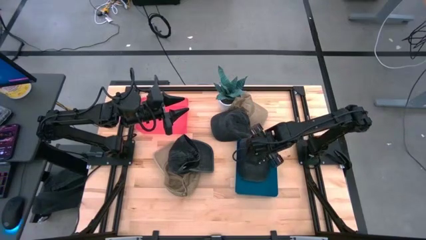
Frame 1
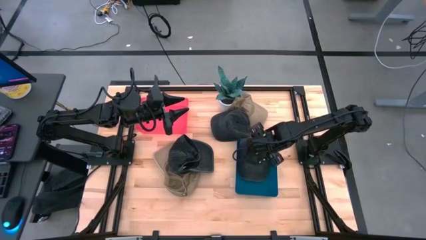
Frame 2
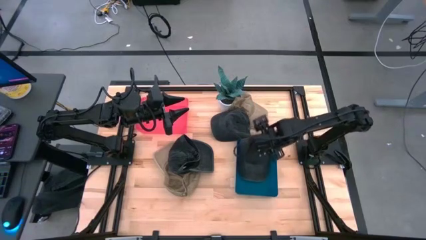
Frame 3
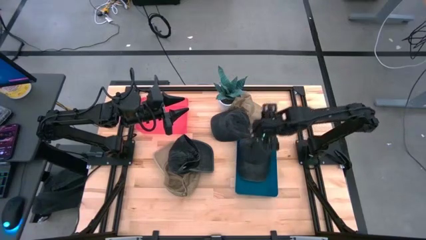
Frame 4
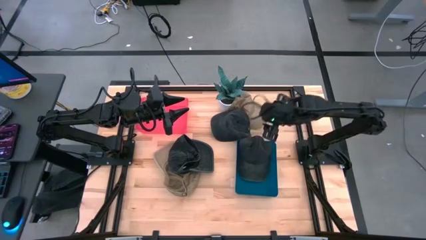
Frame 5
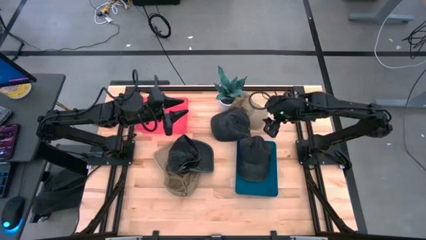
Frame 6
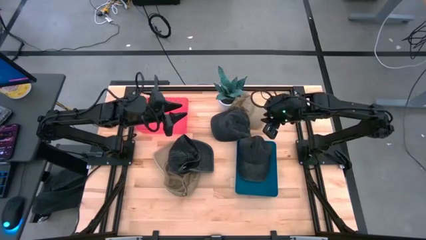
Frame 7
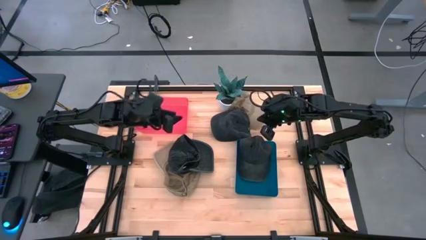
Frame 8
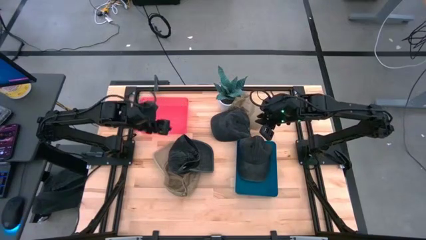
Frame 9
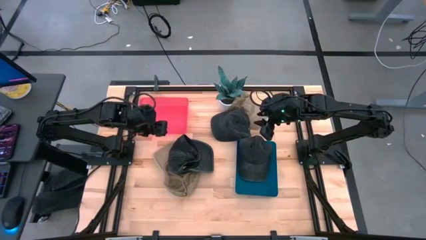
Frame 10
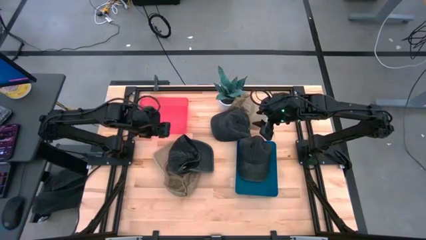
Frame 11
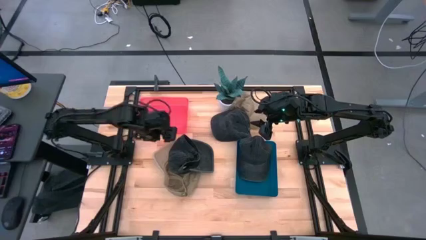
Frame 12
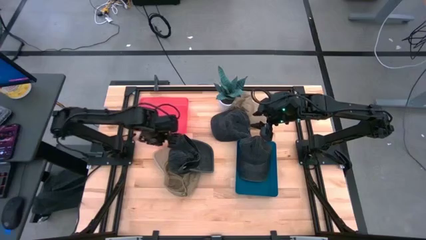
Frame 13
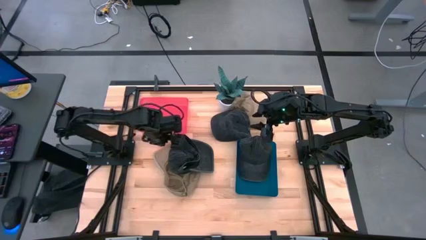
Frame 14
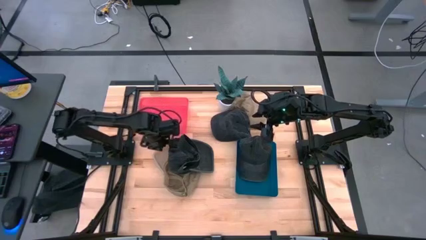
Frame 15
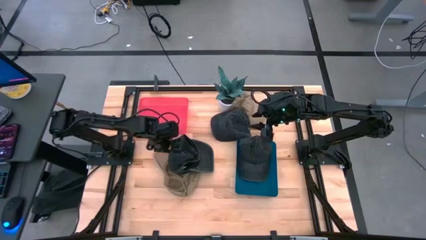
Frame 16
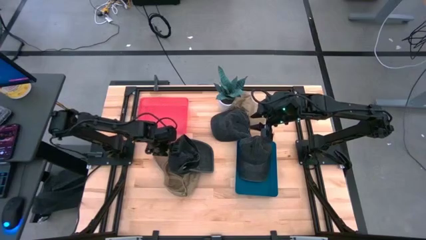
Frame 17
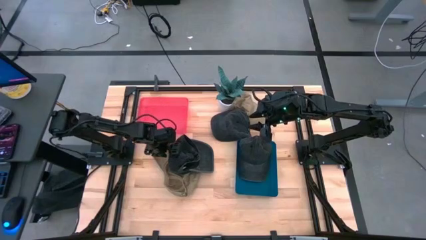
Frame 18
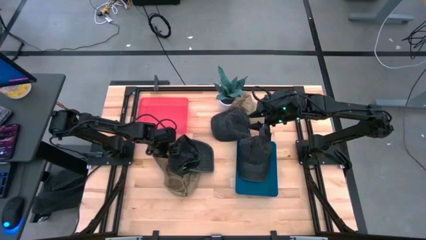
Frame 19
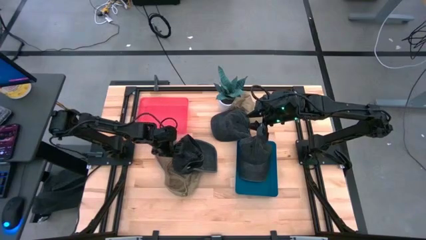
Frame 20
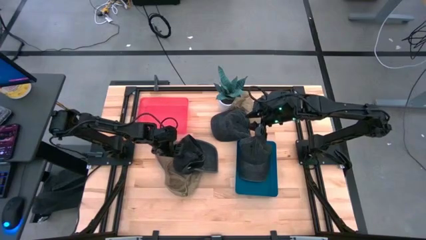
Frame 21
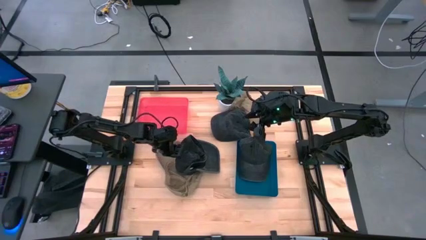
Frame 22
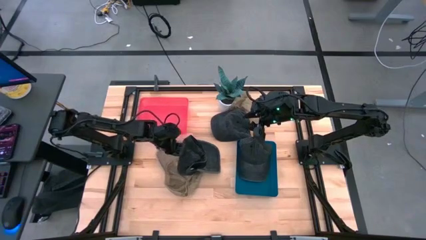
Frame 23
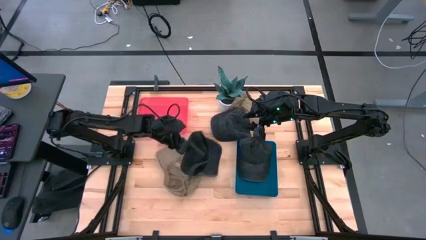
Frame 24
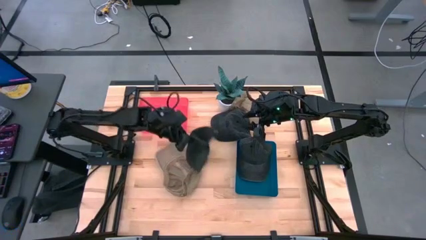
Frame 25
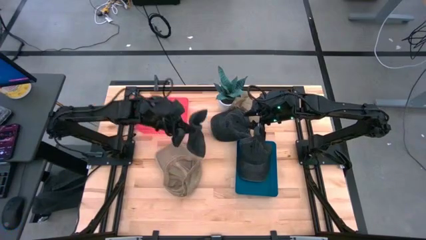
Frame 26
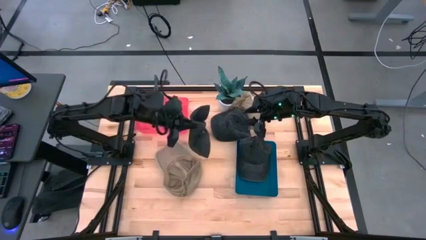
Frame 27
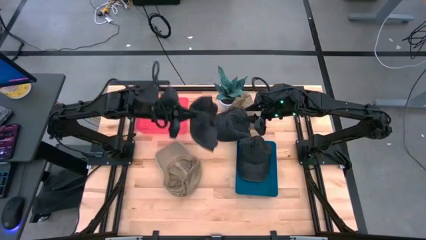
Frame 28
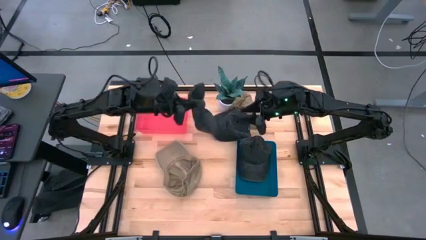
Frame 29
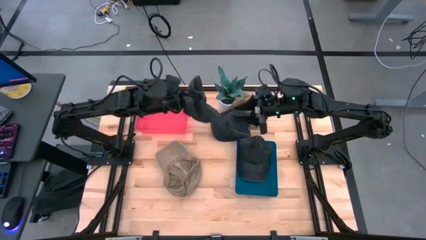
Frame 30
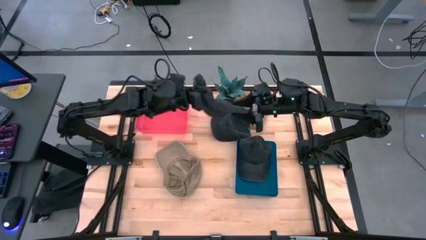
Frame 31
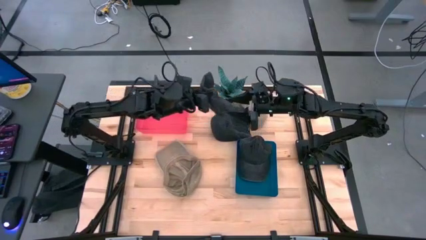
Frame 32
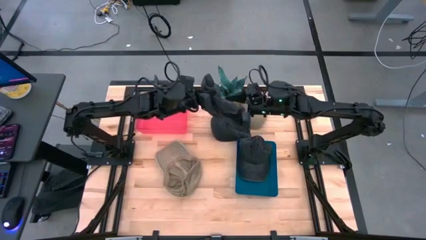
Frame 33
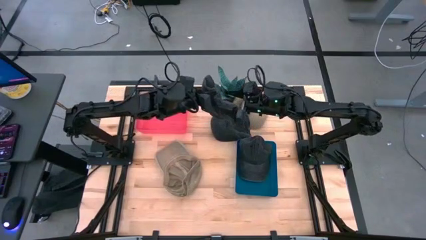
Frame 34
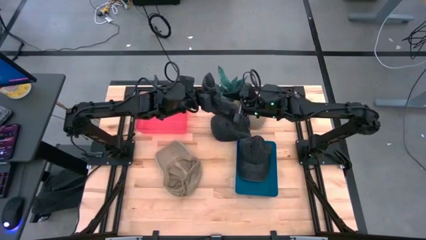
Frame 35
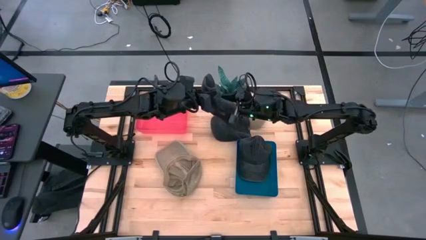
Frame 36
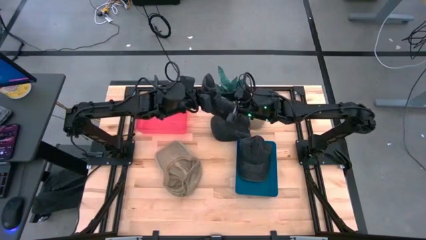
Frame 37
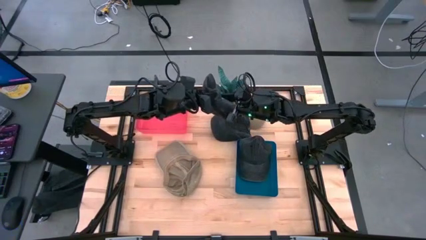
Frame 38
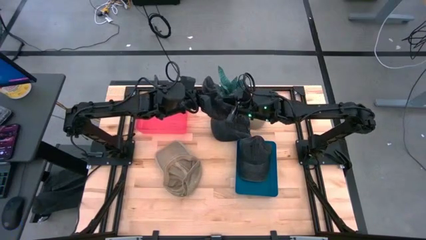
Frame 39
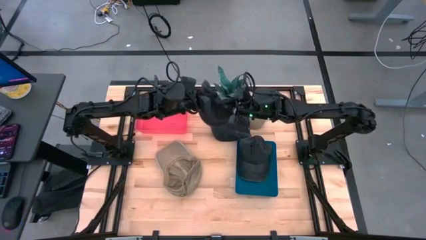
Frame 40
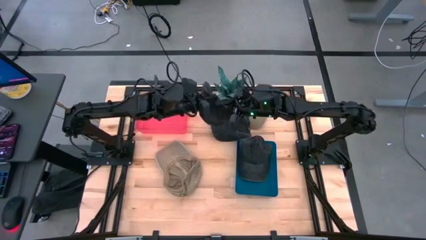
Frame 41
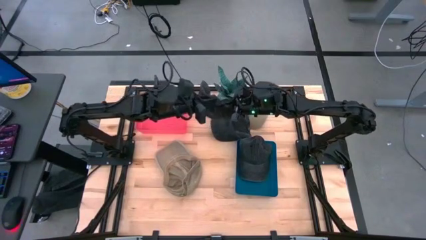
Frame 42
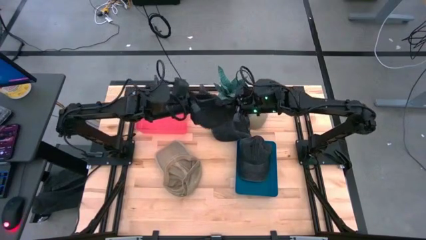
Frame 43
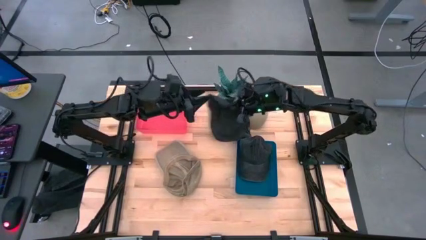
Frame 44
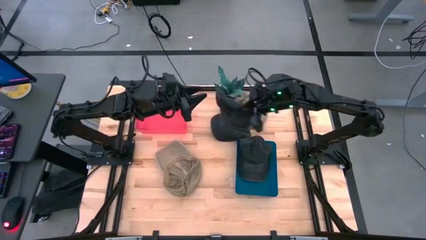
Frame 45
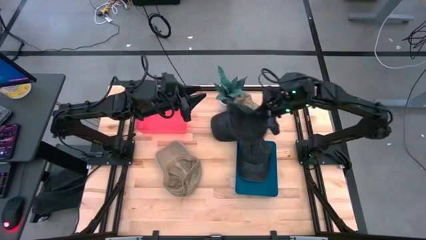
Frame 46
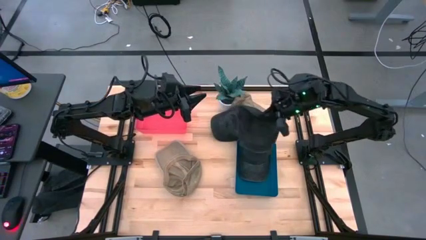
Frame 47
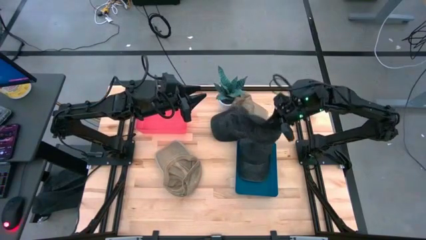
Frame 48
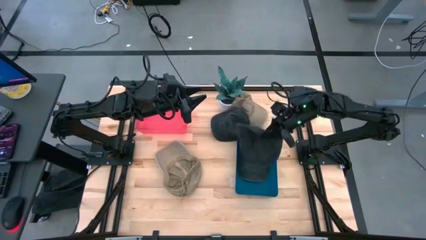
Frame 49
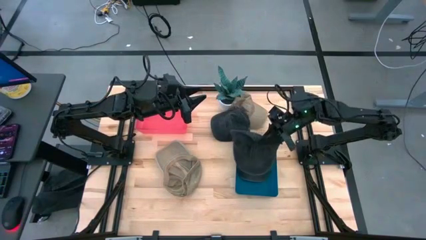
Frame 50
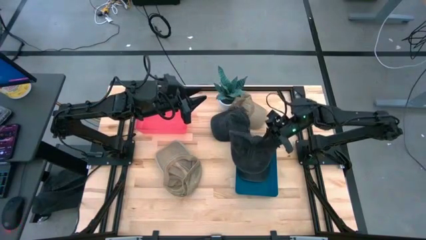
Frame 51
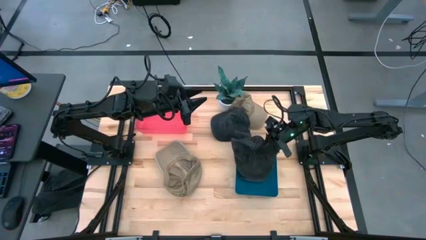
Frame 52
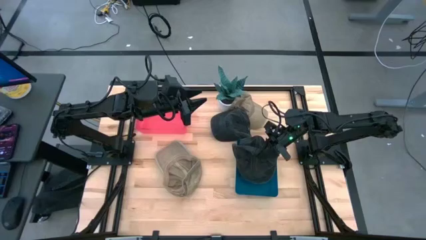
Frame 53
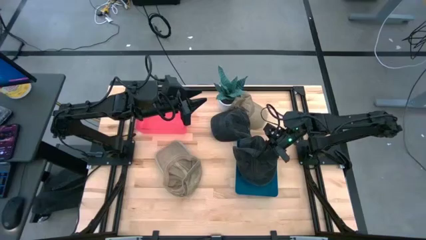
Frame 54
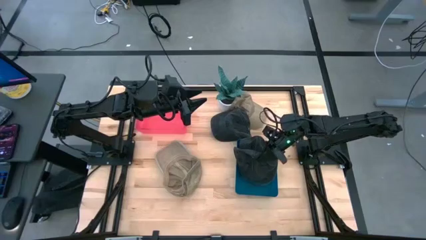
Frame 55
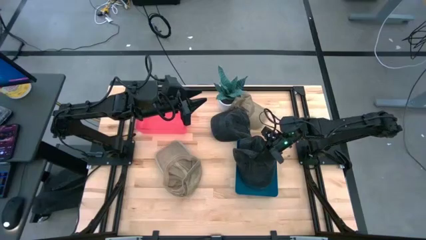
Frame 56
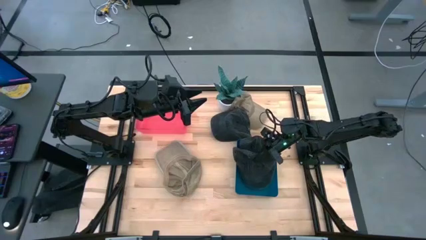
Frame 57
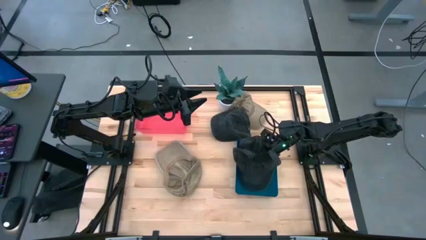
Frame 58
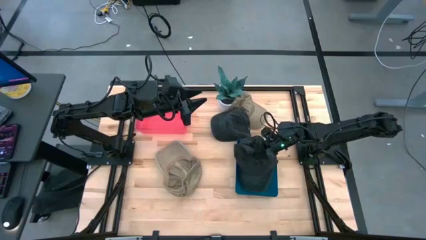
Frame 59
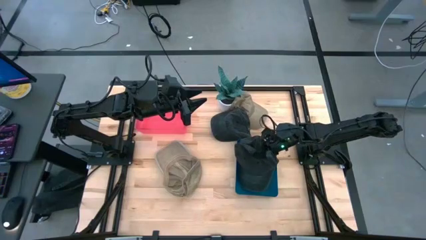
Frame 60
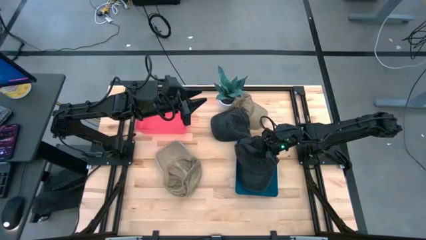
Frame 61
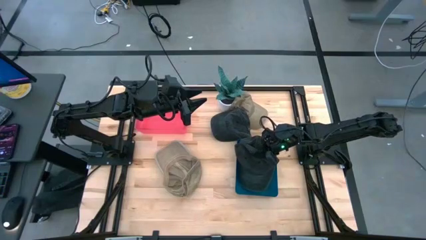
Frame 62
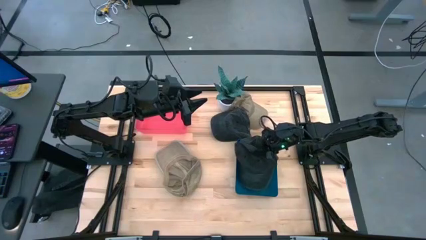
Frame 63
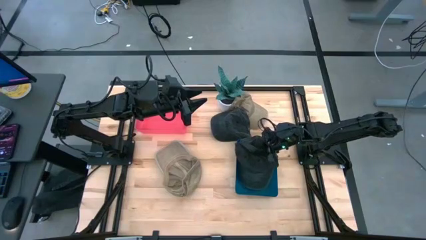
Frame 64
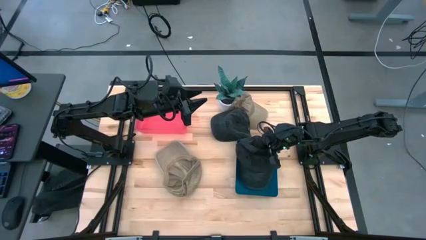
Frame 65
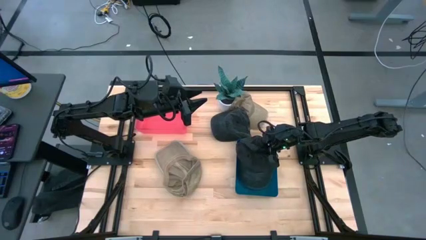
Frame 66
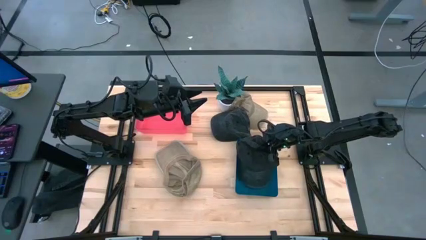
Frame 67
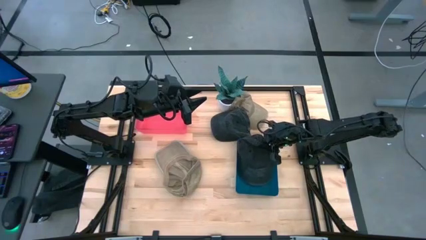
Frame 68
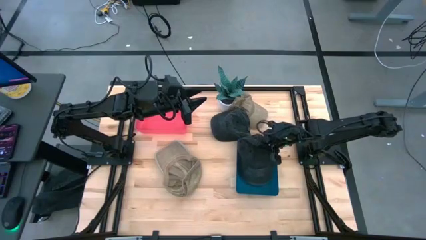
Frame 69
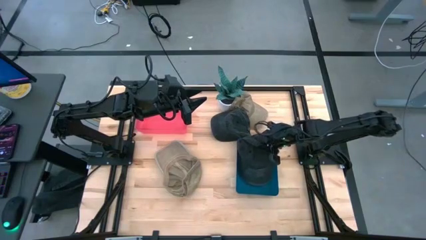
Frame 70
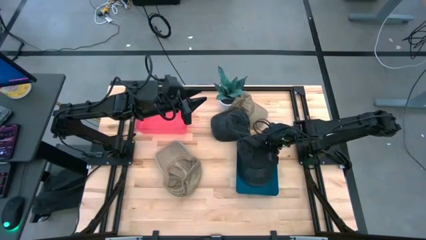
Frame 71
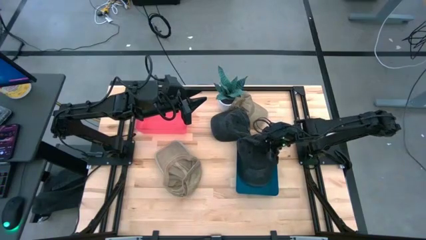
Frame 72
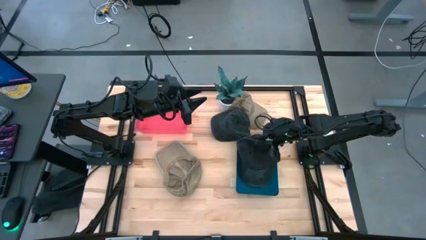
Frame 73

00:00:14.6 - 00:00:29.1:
Task: Pick & Place hat
Put the bottom black cap into the blue bin
